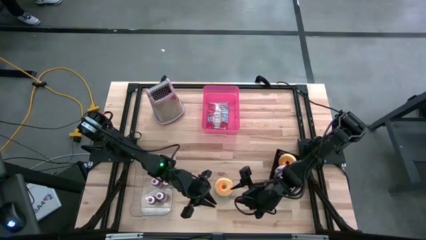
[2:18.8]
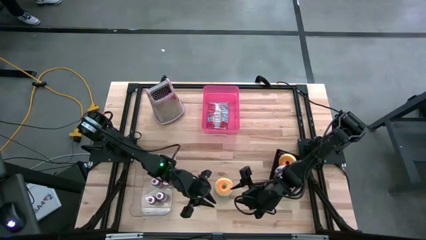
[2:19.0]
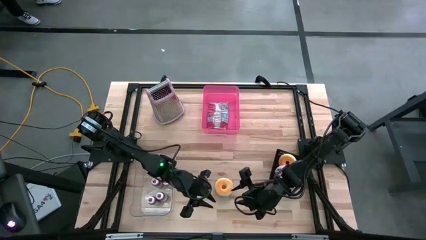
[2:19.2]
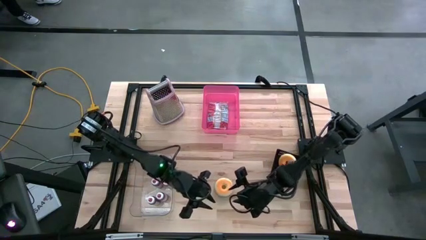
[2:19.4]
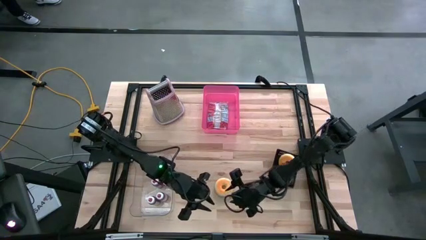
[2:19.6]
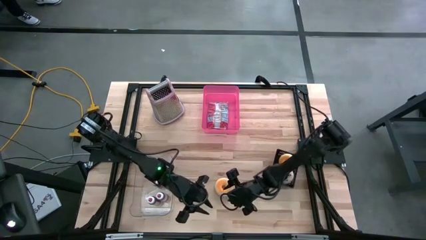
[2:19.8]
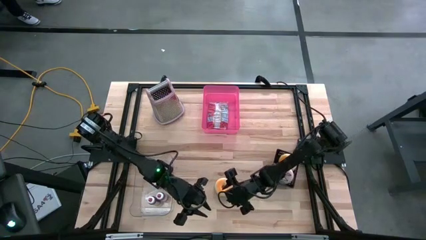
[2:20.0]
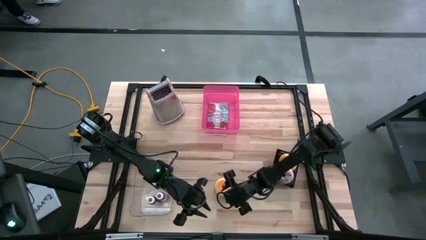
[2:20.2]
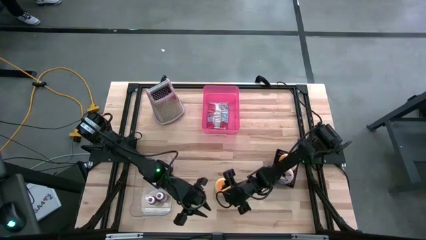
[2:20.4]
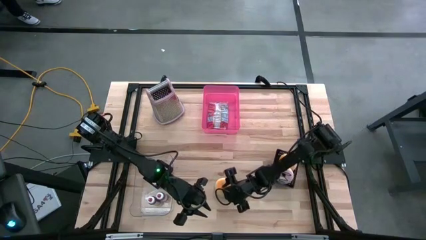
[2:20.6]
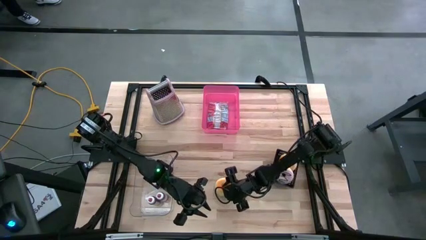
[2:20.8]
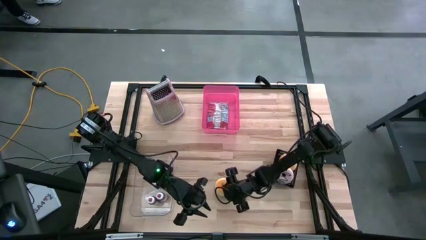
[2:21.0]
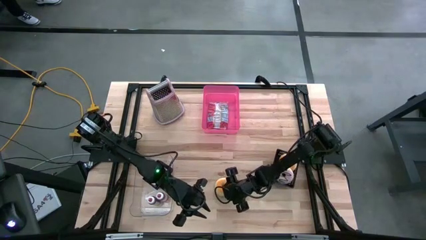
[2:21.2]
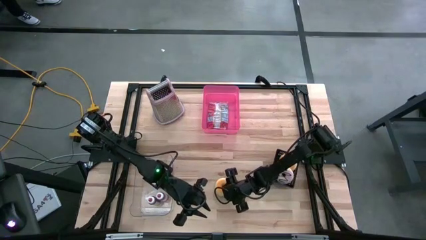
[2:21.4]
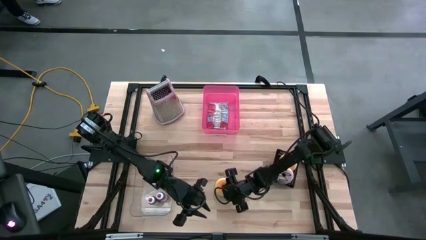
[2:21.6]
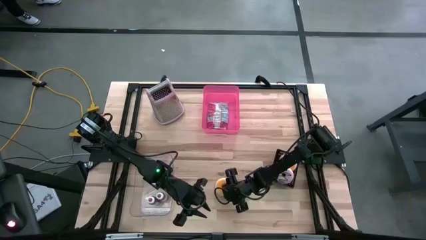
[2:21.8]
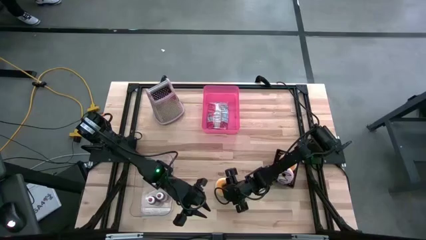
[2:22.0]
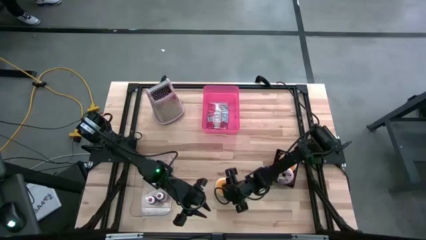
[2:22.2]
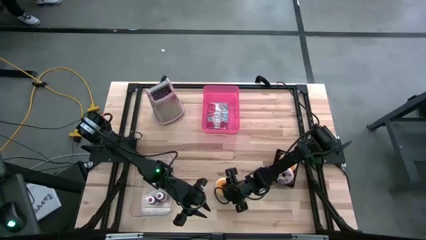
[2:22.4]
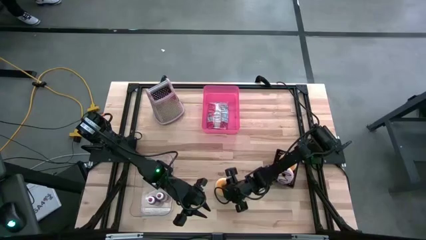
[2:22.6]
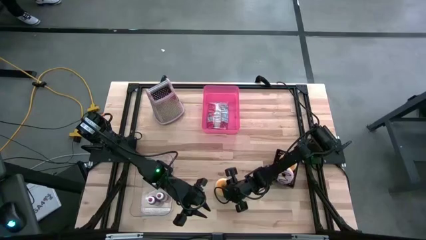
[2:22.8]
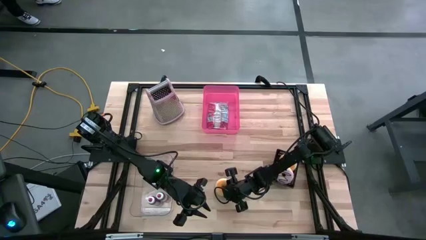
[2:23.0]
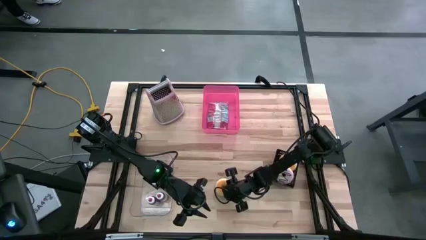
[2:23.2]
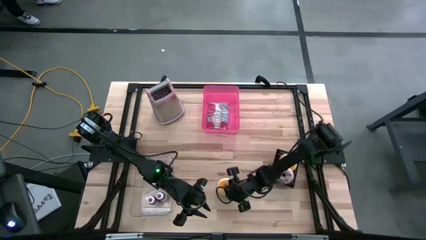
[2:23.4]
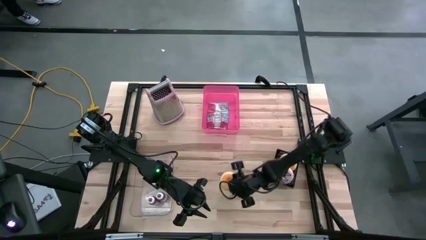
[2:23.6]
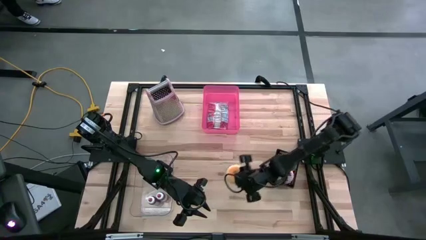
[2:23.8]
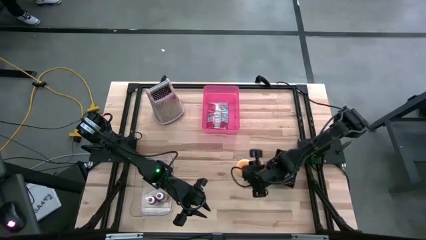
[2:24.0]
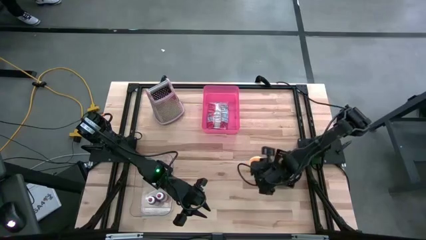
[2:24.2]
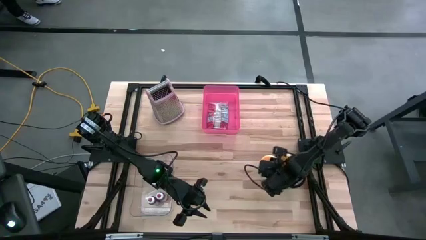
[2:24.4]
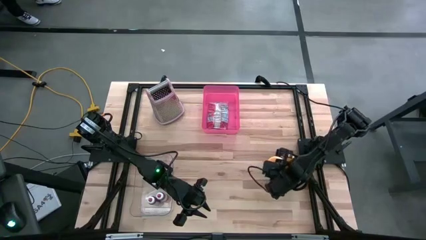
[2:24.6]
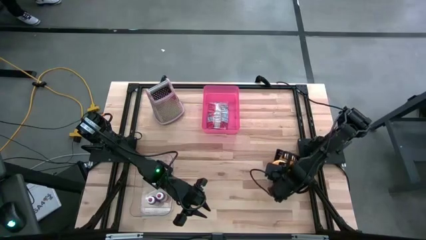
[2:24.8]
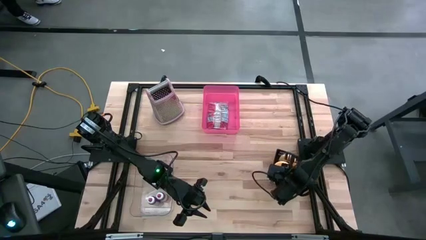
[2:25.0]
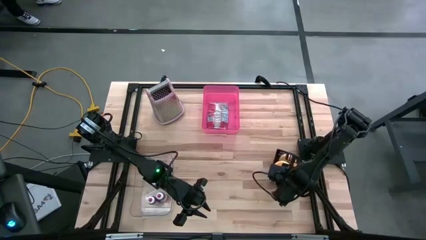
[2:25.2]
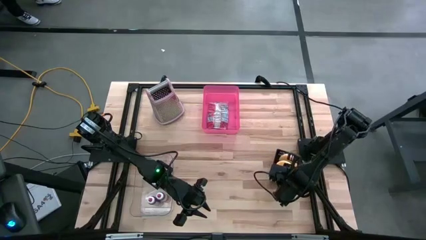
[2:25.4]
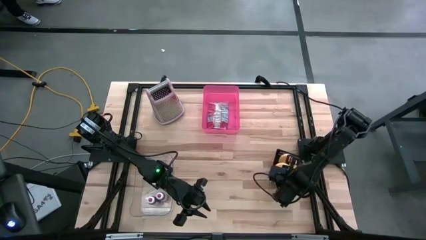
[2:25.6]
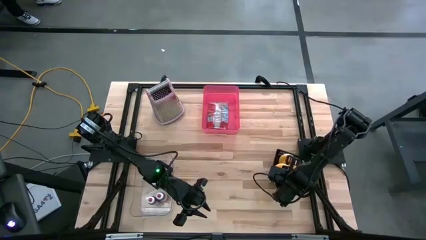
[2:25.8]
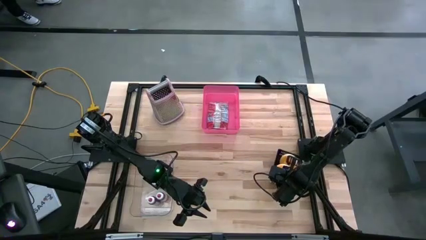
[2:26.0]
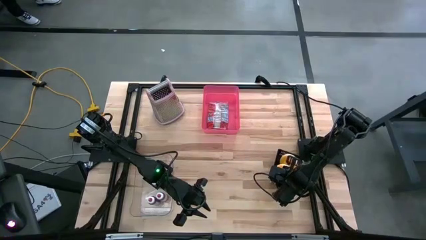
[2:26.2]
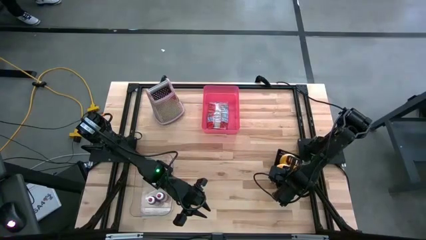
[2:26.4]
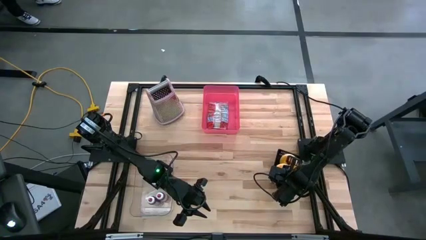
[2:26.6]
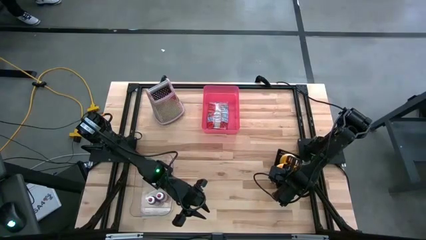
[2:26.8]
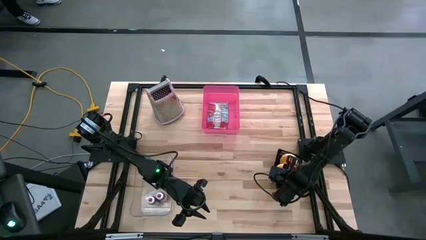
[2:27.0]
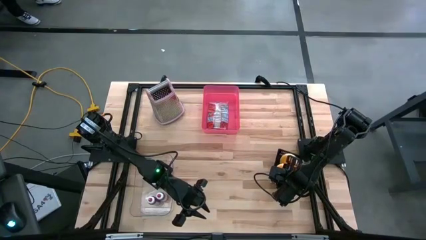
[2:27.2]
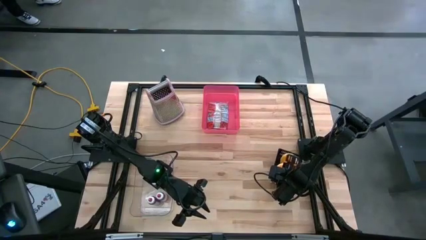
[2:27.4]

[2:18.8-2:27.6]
Put the light blue donut into the black bin

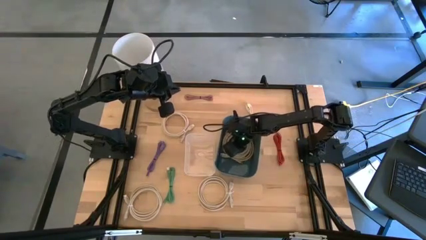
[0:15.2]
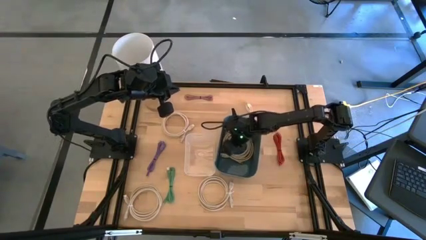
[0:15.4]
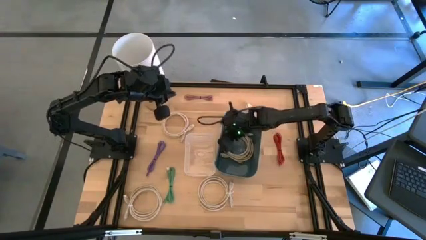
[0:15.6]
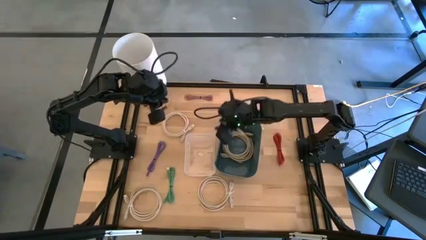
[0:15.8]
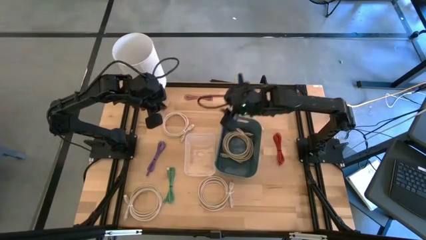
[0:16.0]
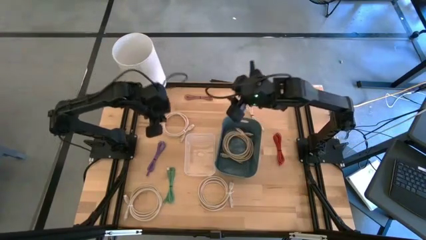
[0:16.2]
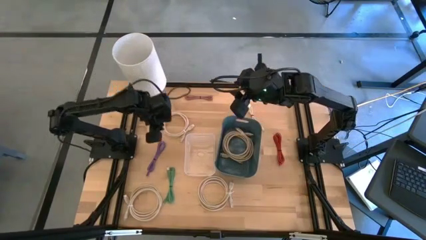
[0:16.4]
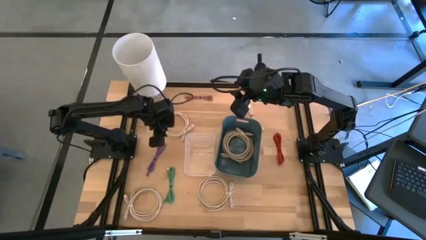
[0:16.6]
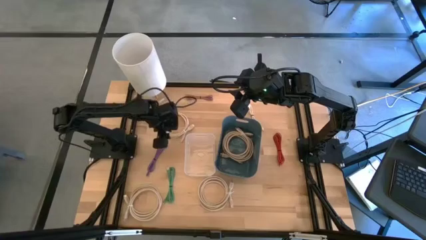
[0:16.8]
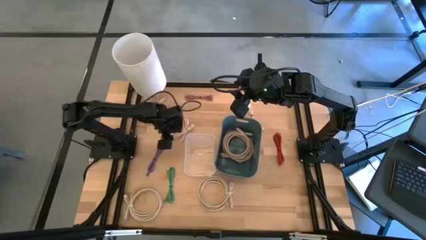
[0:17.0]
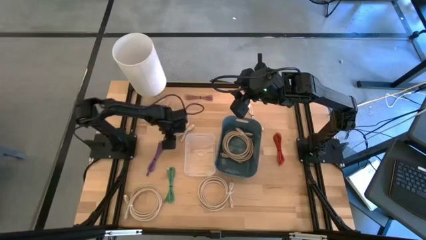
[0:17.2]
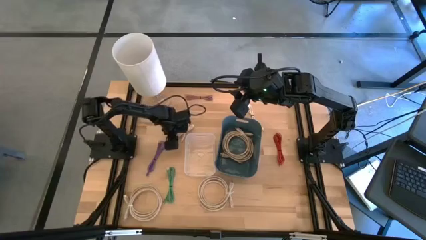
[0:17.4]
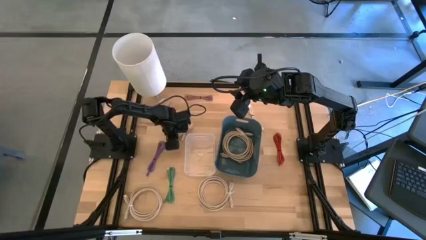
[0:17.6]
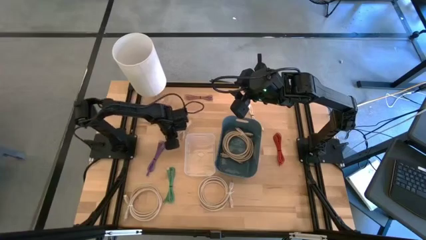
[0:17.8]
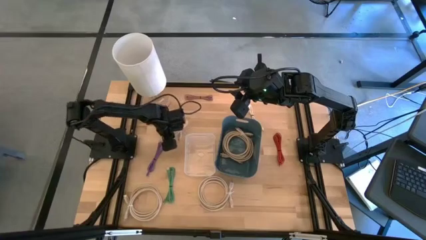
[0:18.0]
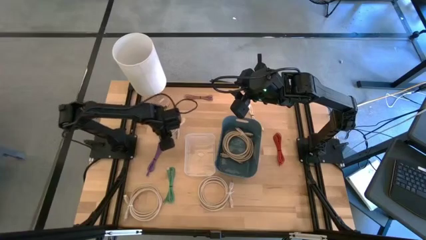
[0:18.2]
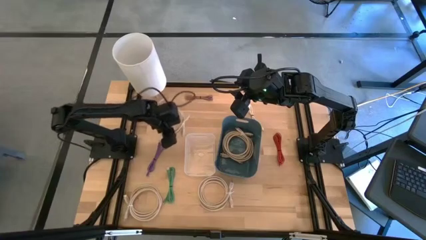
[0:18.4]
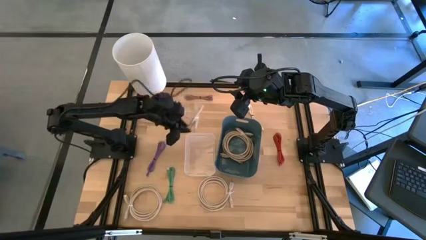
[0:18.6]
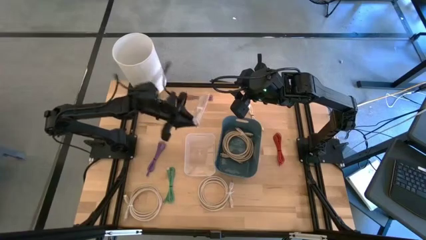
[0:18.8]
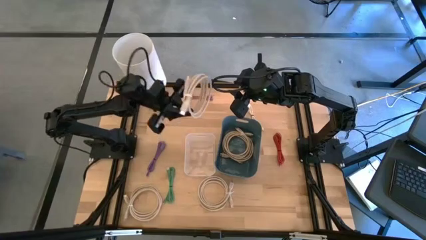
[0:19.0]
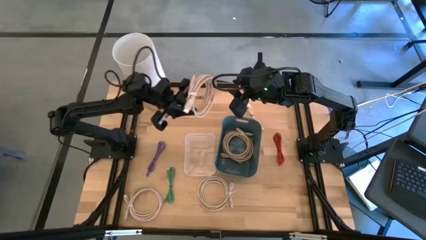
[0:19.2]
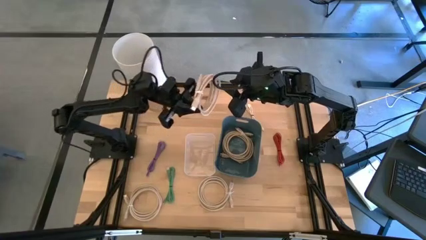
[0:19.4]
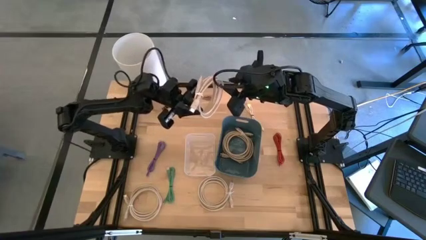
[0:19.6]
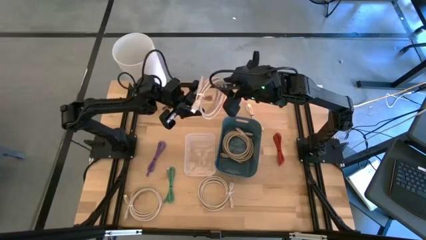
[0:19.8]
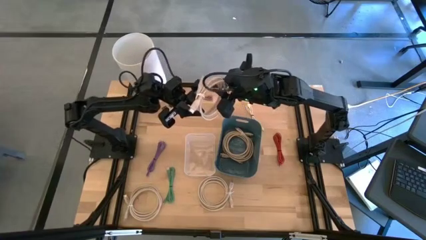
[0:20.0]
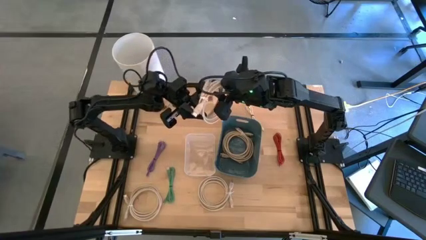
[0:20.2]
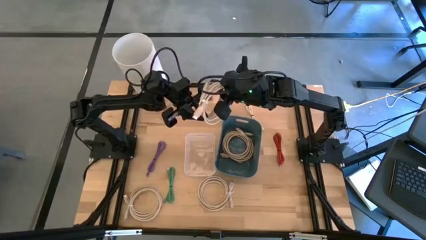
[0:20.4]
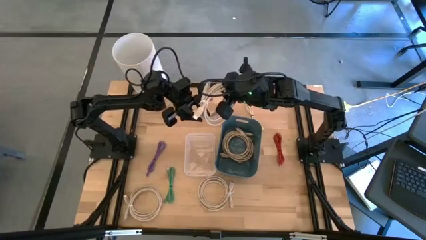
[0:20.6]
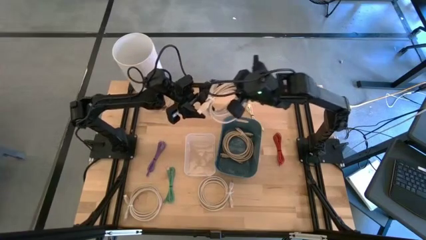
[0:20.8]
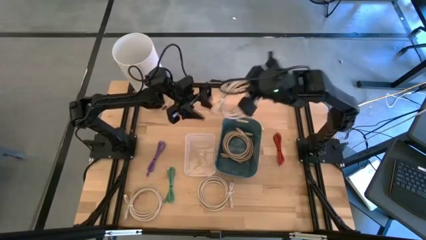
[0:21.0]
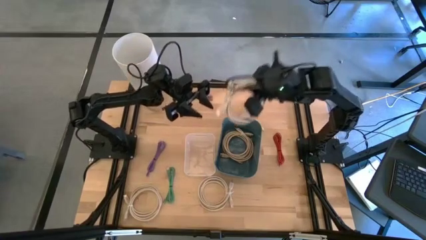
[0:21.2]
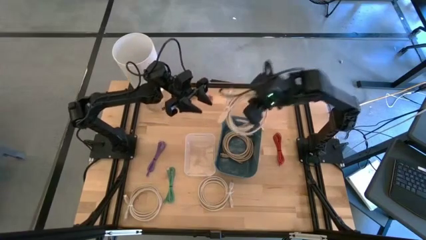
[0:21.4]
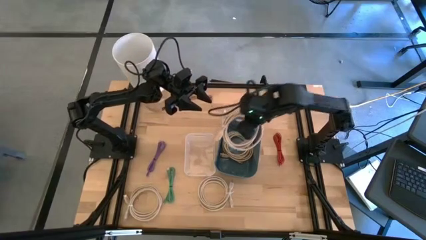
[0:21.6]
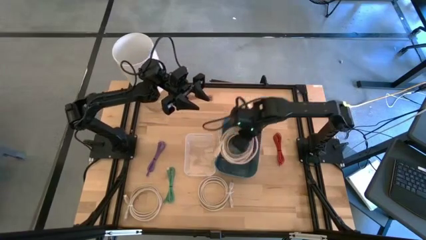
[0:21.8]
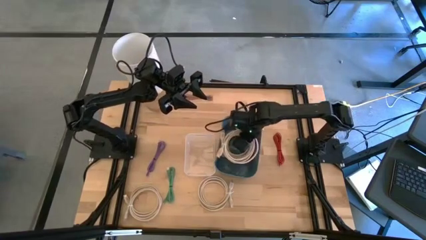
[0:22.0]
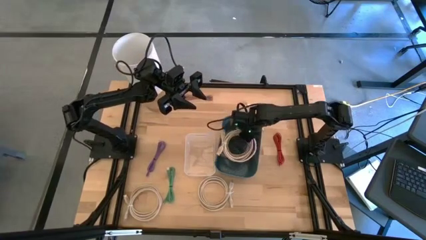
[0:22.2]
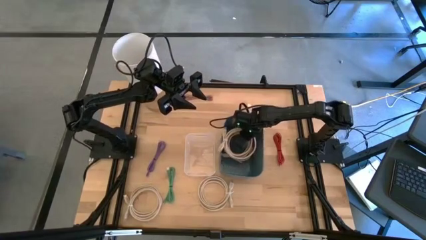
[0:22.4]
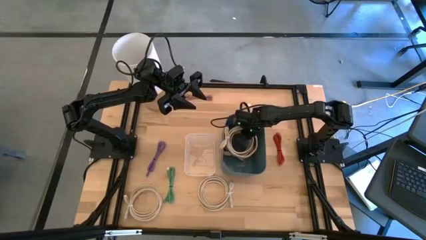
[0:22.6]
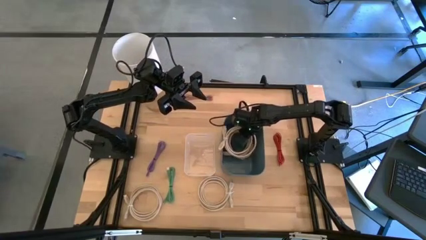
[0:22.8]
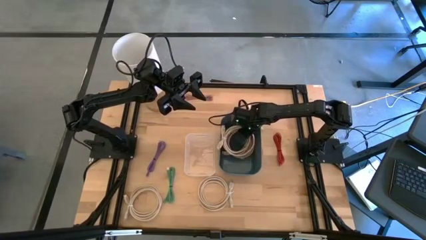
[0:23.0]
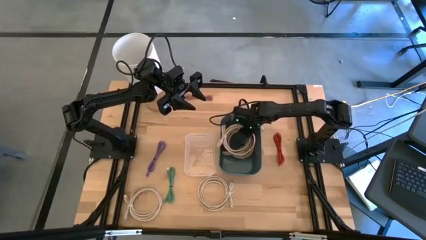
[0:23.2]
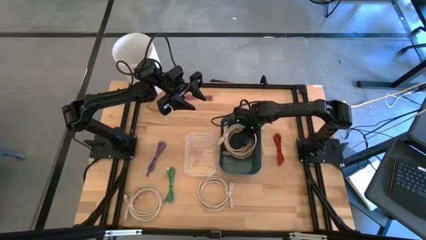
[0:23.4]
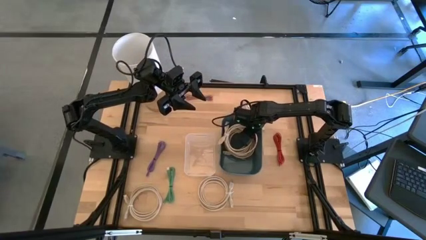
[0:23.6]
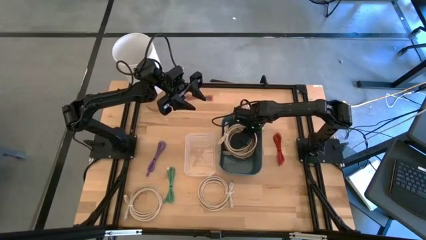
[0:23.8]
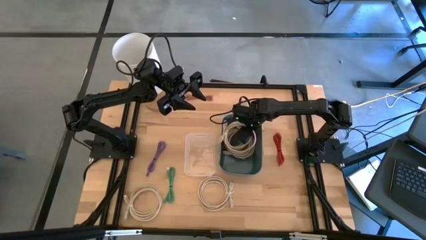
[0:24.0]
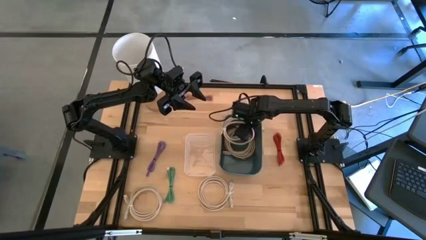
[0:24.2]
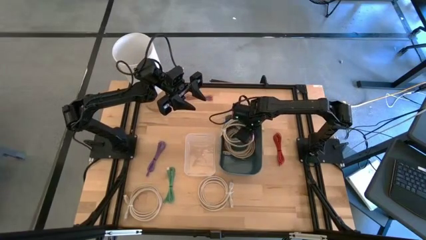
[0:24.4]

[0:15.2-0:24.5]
Put the light brown HDMI cable into the blue bin
